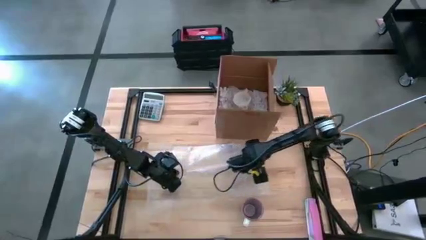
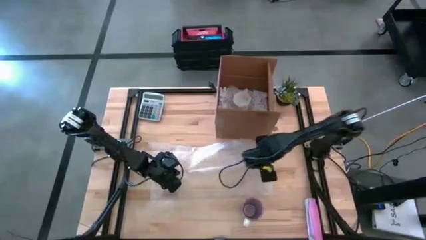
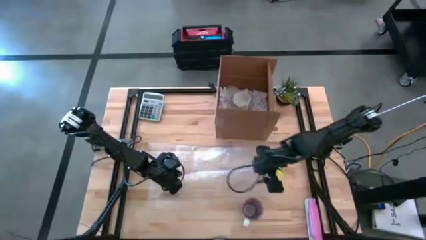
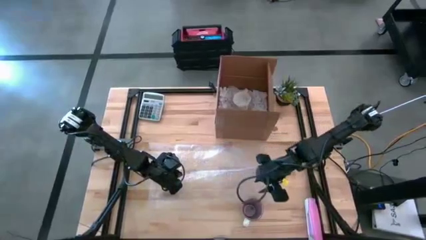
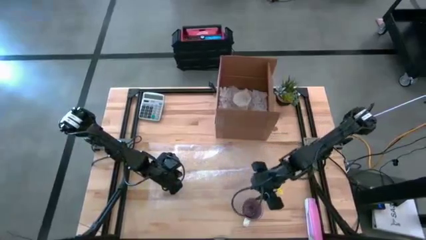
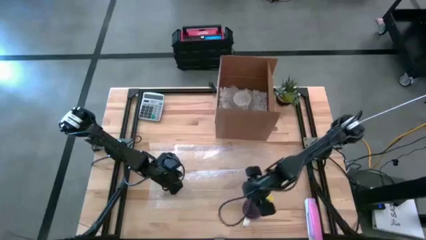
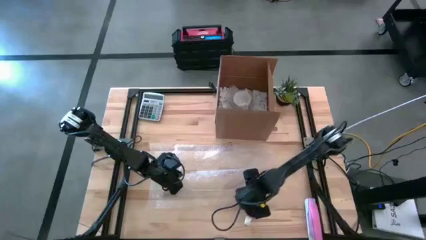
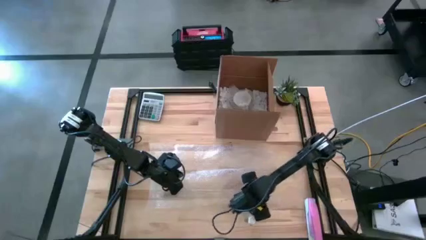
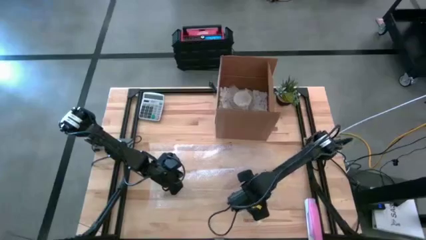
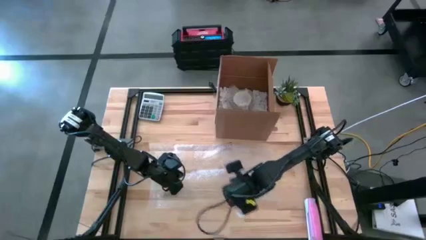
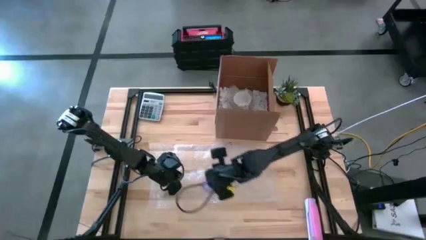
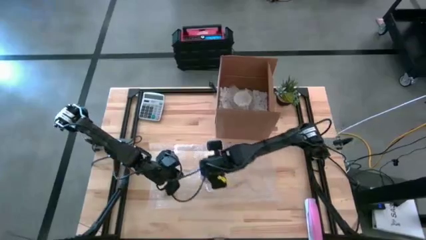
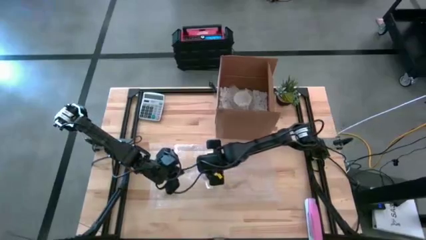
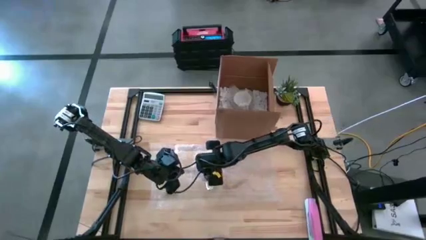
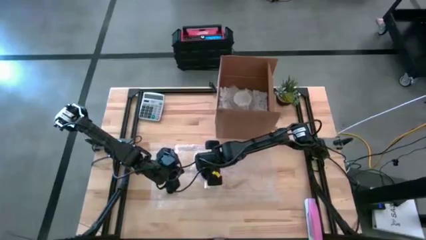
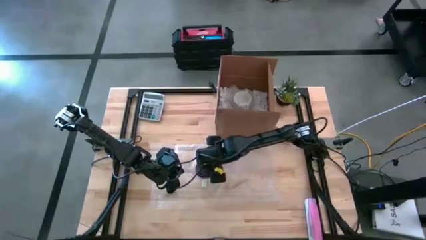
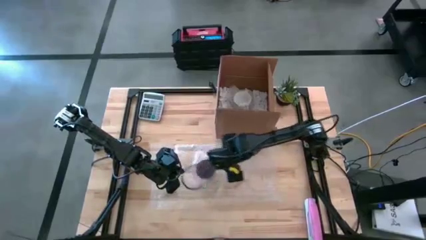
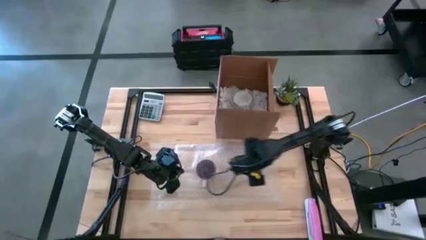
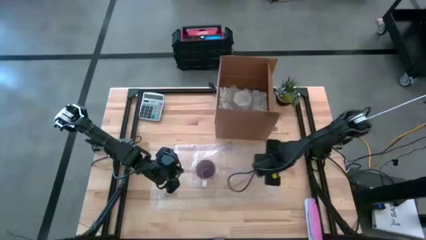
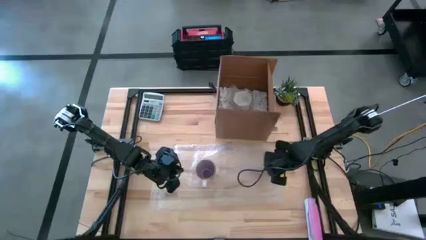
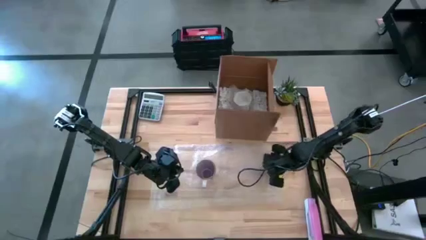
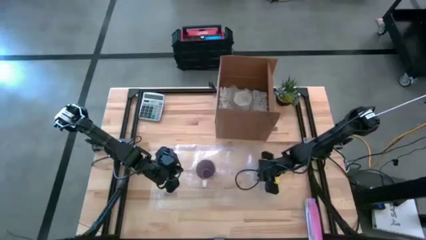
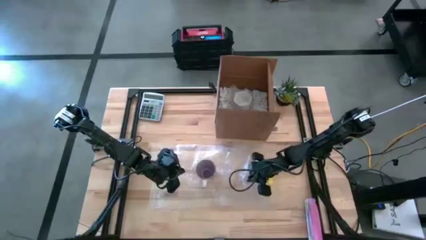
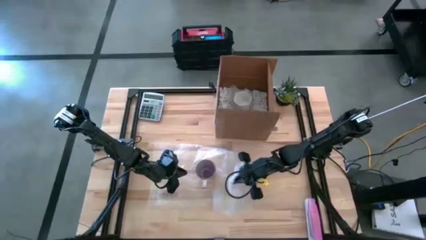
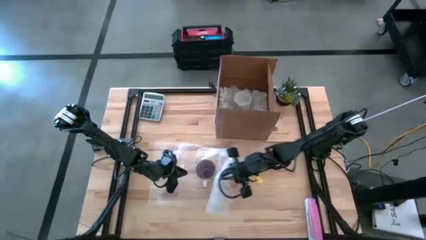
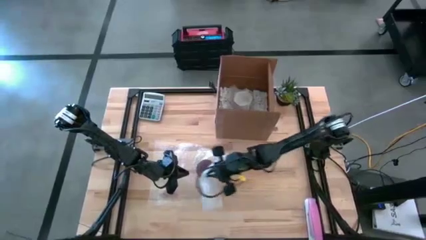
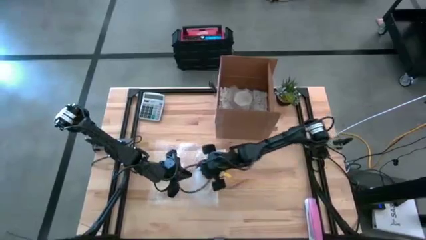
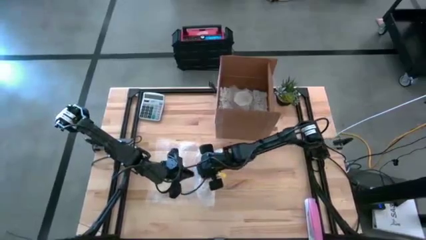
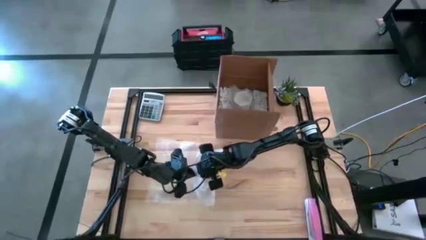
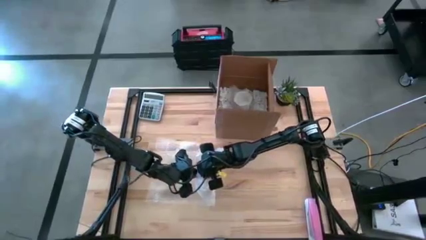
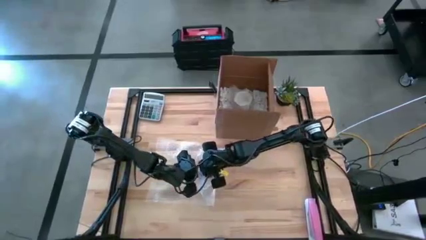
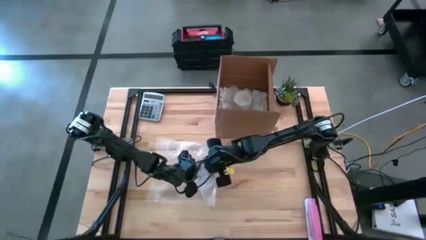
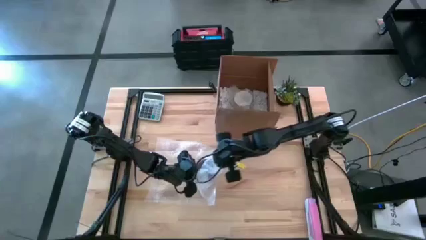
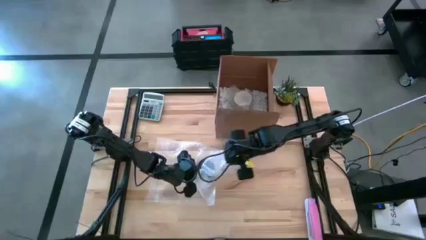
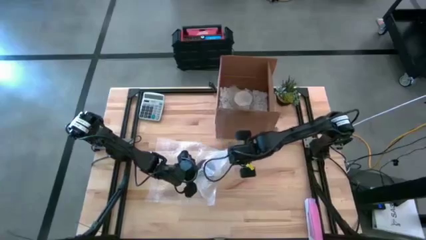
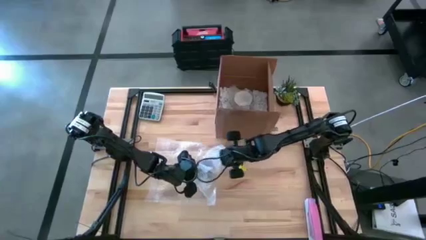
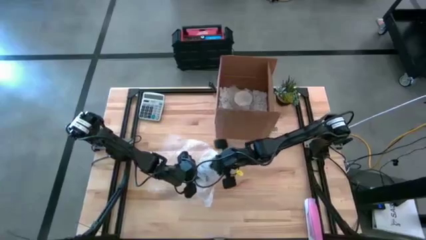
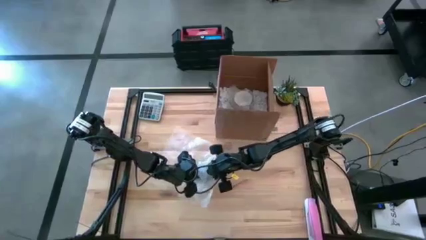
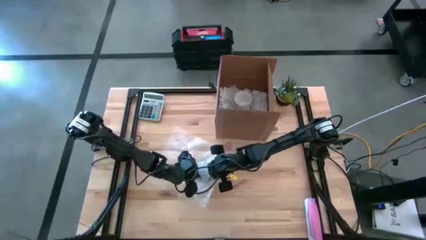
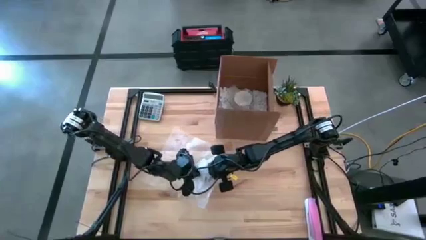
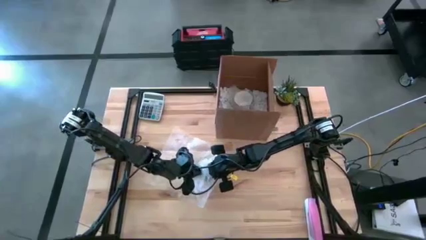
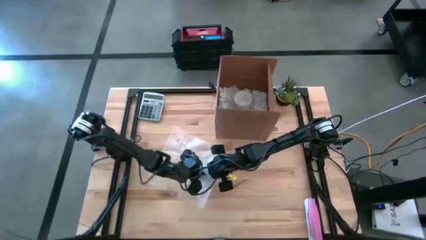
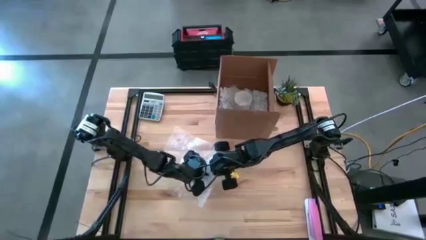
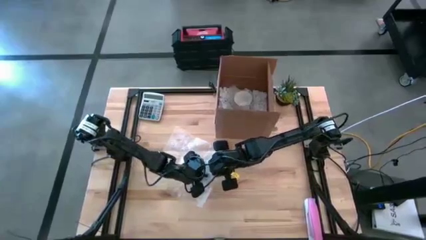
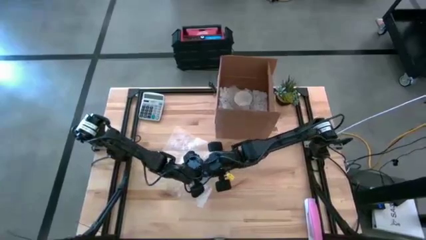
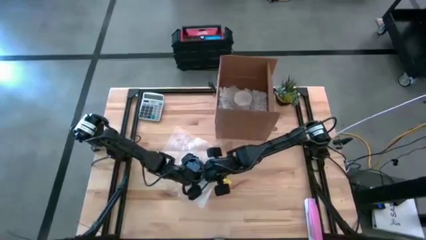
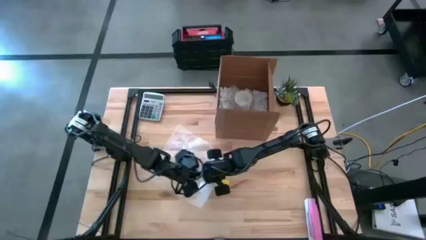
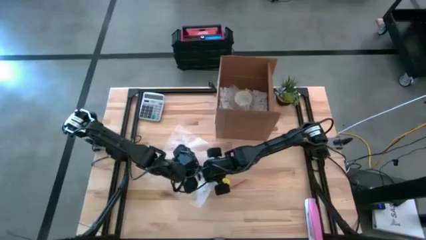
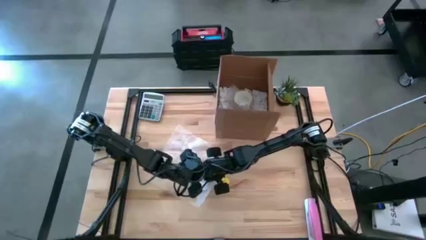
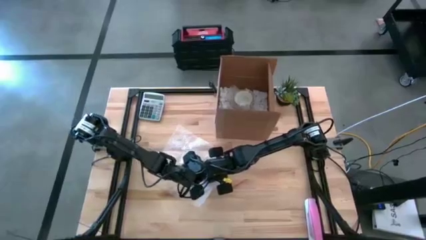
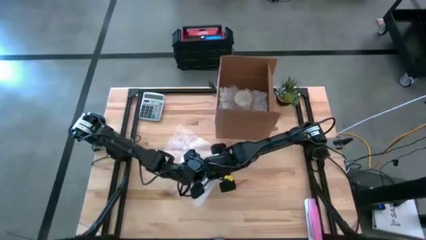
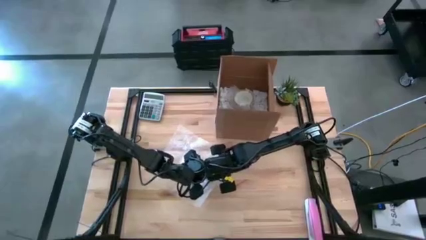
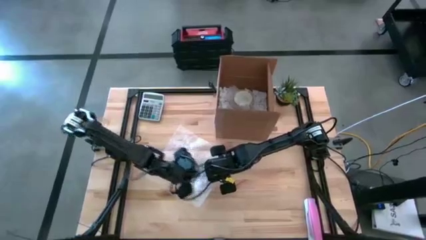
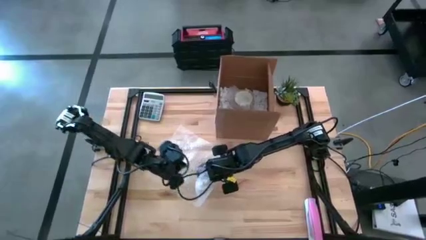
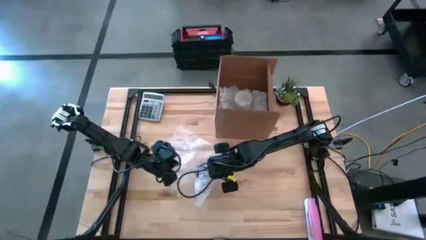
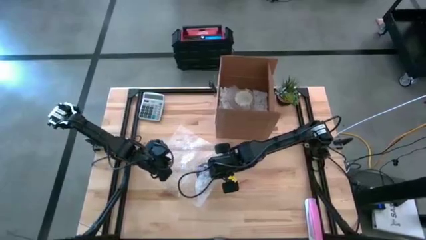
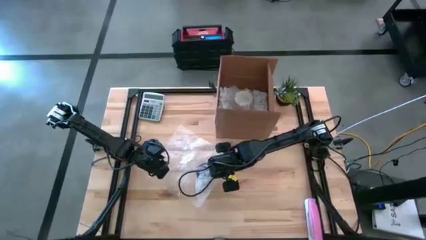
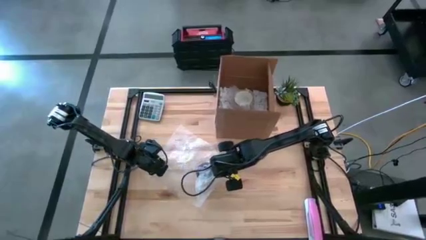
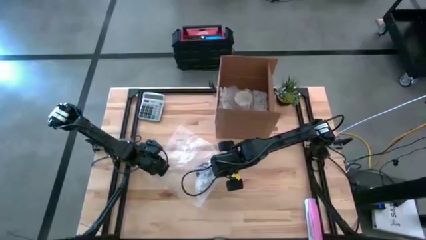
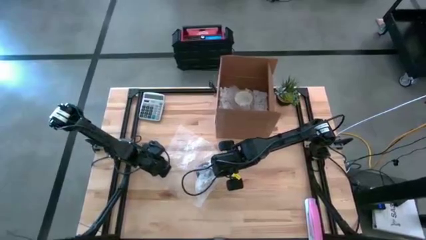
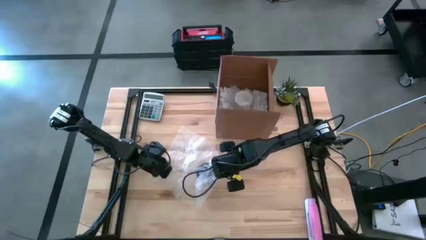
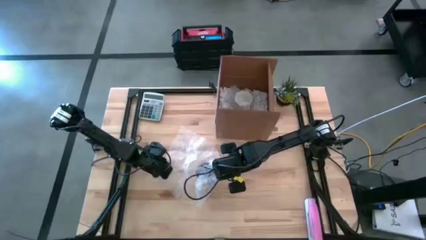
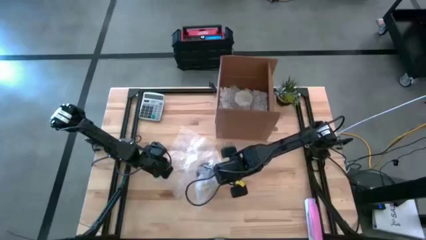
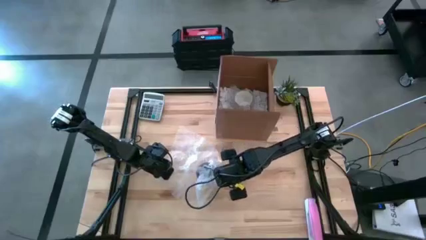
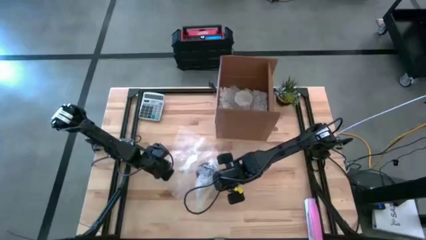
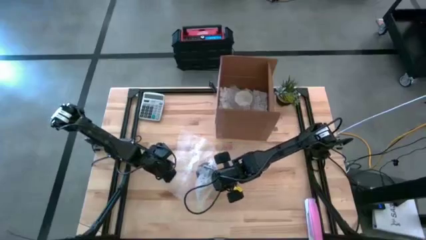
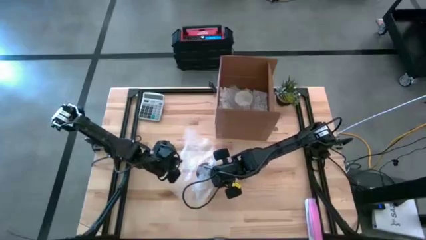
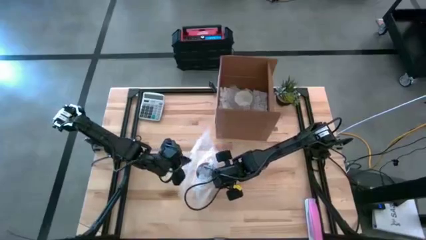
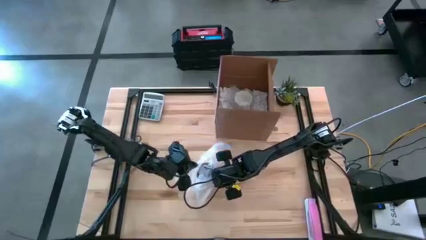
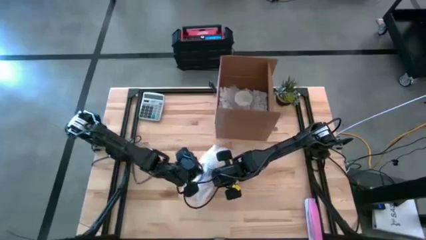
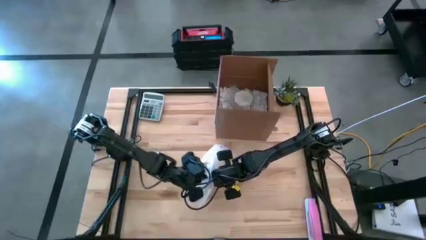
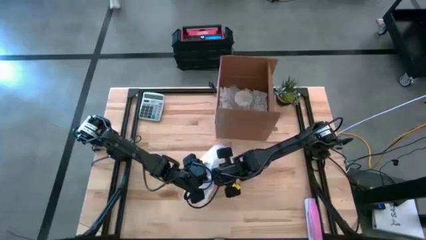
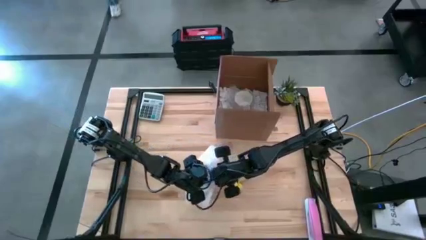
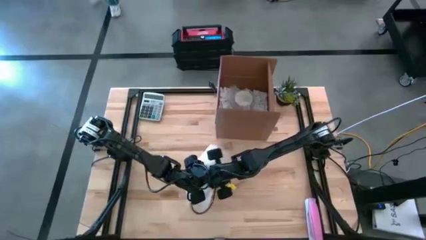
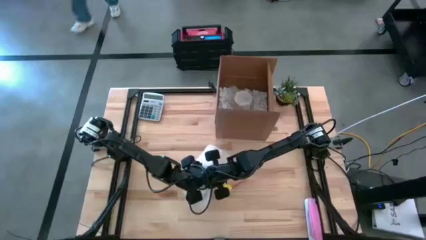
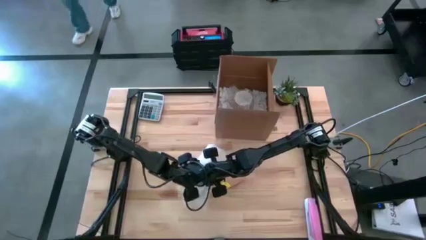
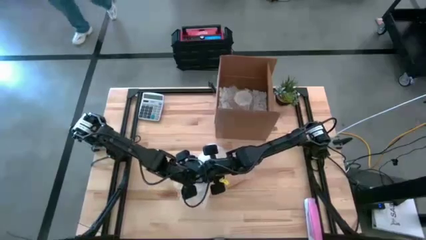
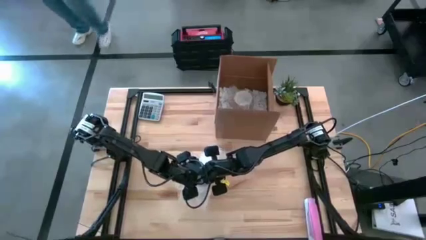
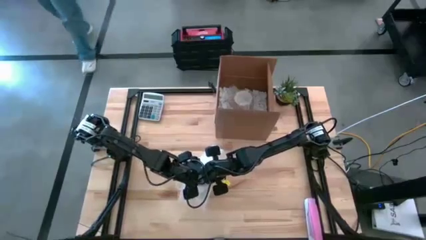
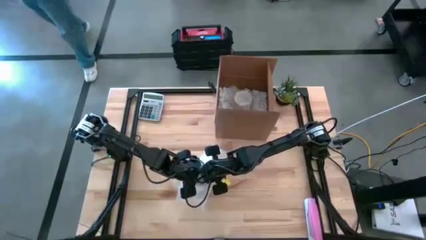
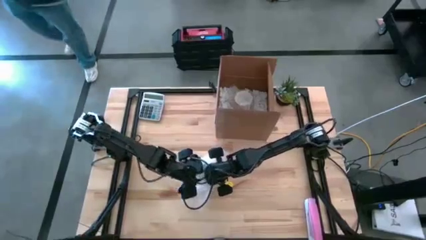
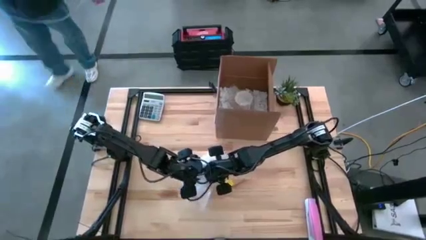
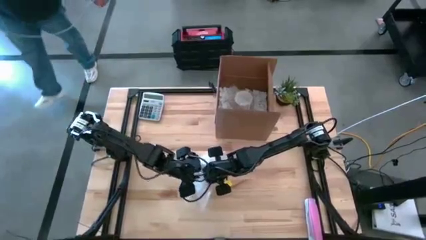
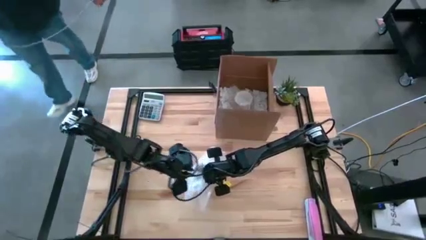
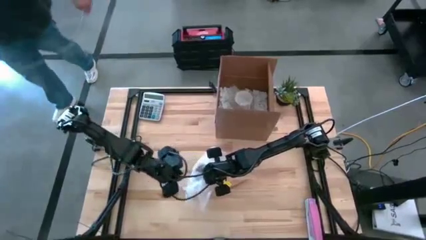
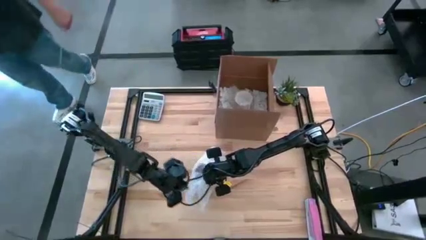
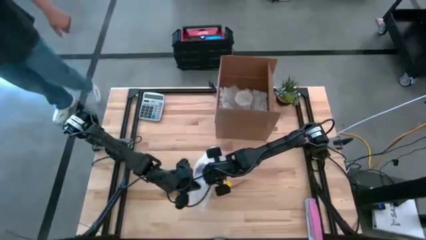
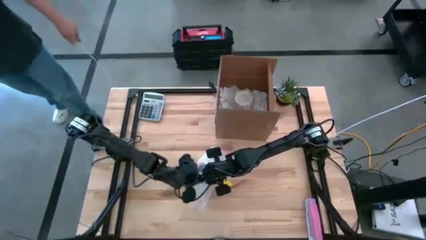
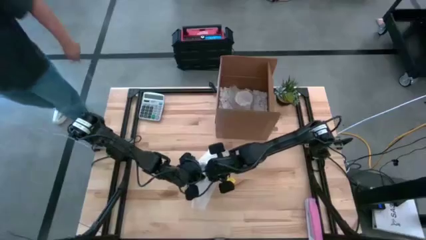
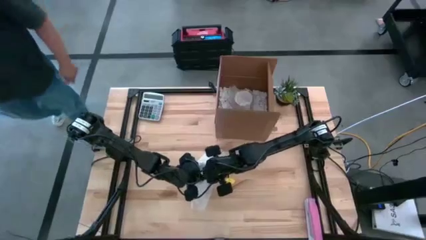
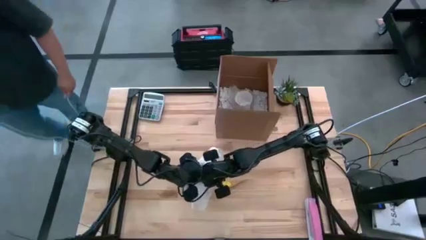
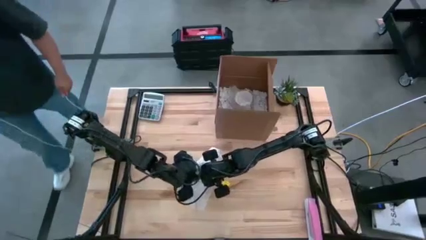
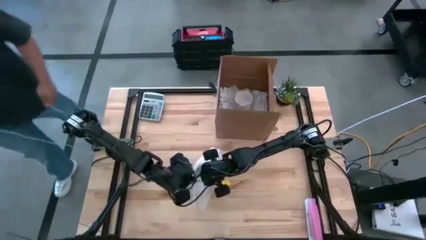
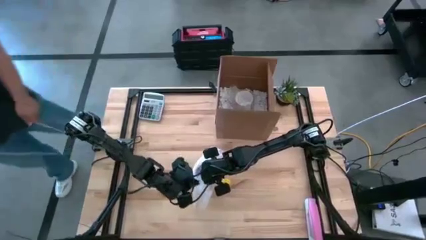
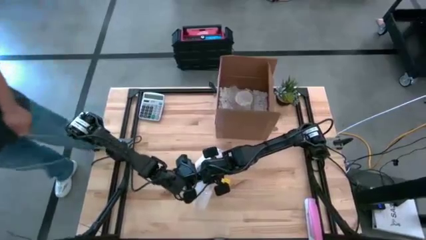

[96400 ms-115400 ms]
Task: wrap mug
Wrap the purple mug with the transparent bubble wrap
